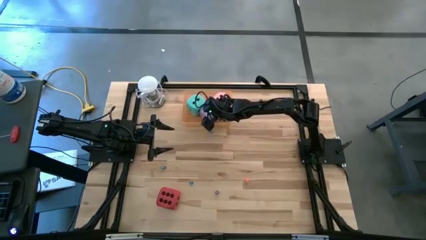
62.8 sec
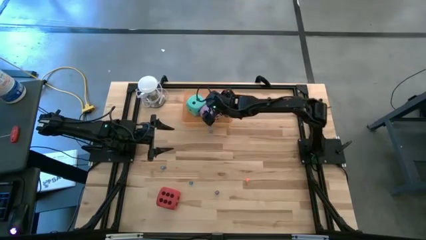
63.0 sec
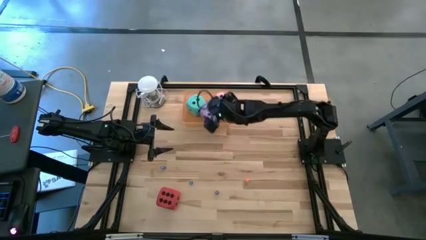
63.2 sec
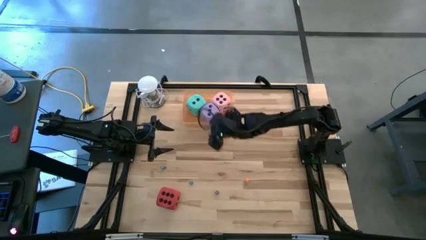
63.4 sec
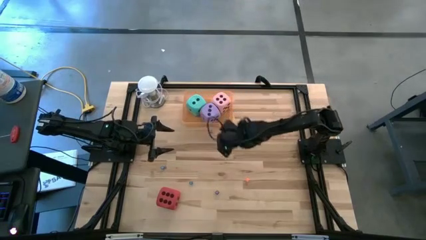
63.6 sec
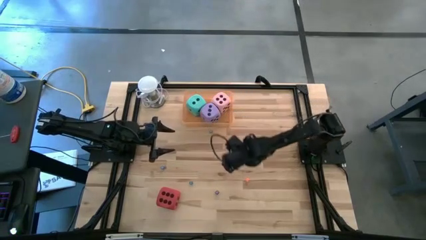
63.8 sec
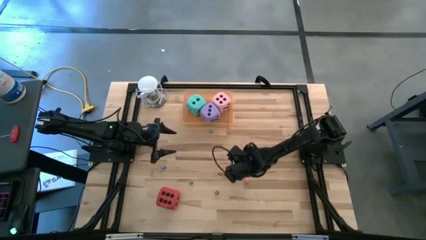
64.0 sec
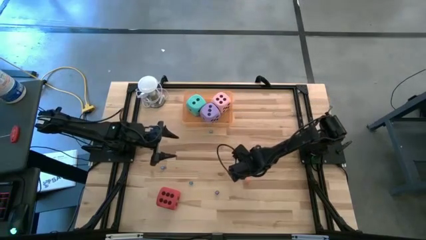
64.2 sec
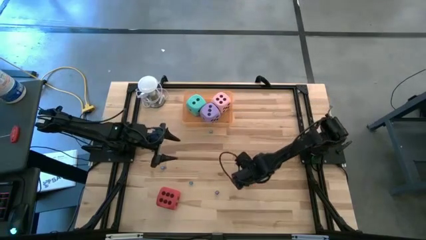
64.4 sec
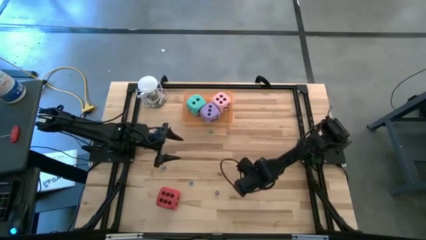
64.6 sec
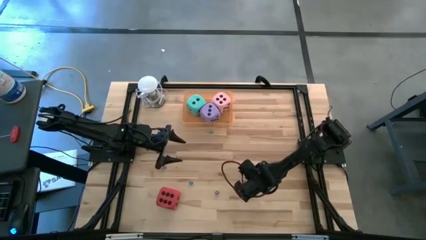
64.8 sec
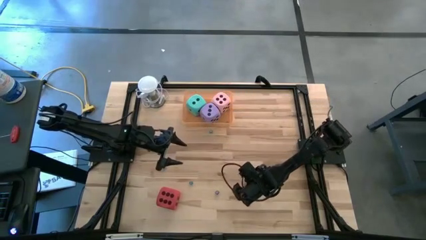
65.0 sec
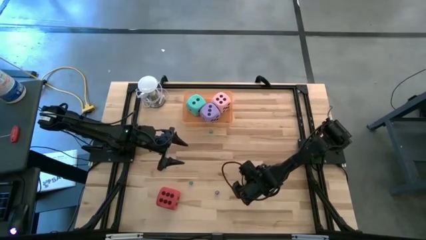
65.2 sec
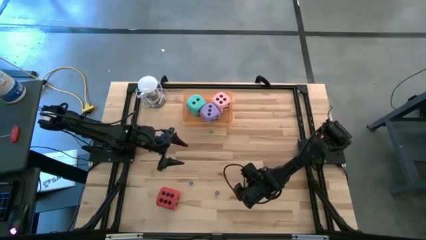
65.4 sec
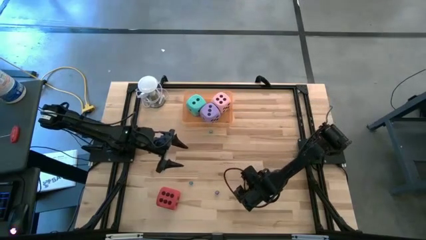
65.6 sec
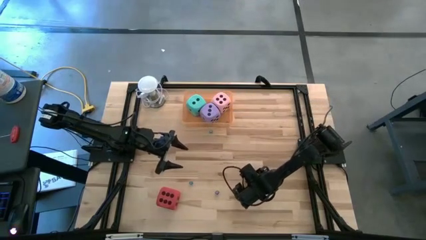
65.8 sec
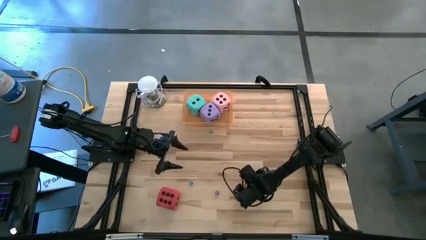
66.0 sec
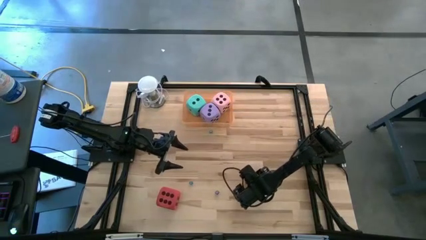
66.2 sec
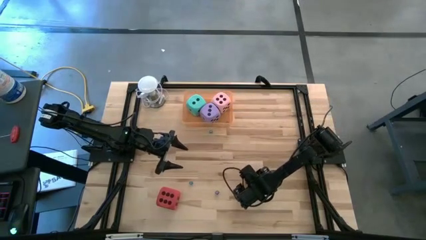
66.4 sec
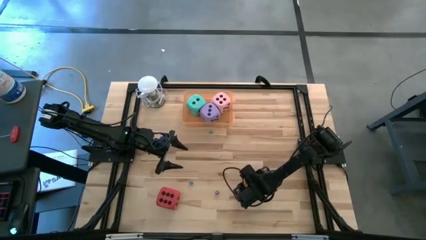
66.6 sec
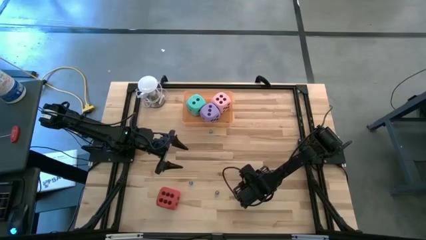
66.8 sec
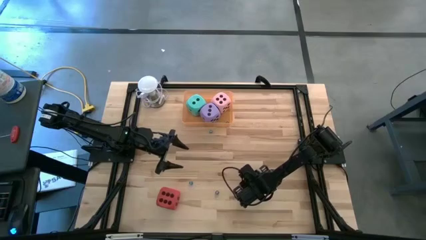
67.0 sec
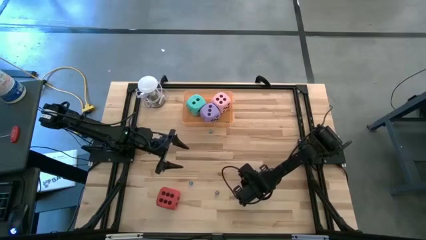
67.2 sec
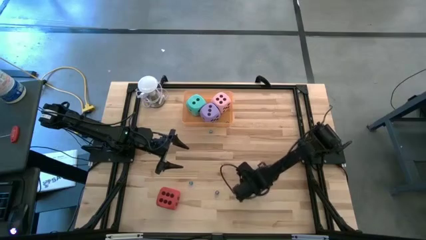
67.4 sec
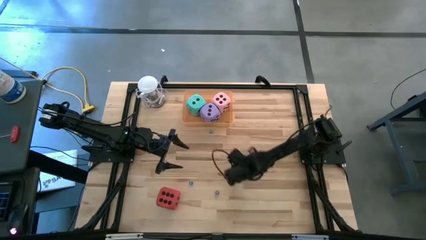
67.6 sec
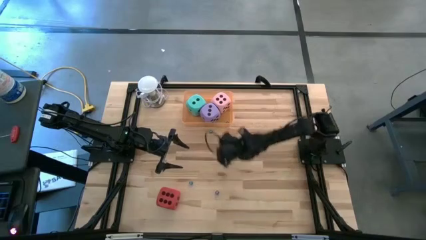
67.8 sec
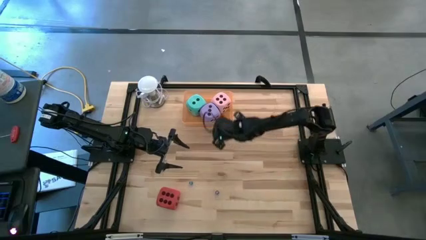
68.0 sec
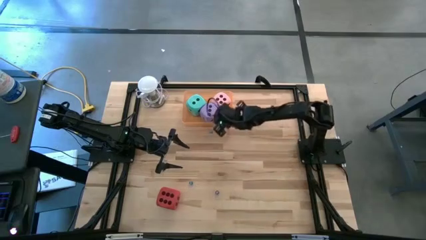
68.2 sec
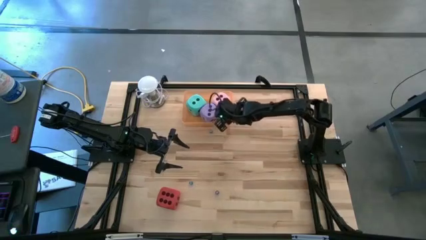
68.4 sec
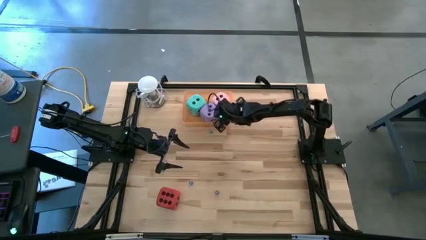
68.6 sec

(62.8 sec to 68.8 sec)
Task: Pick & Place Dice
Put the small orange die into the bin

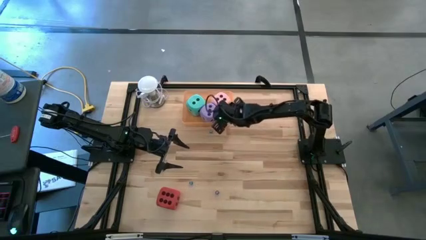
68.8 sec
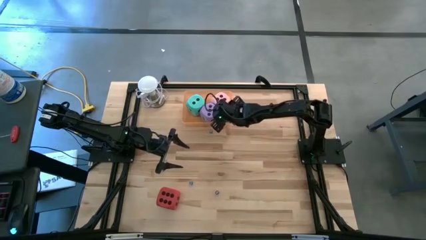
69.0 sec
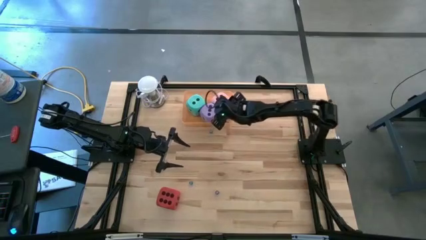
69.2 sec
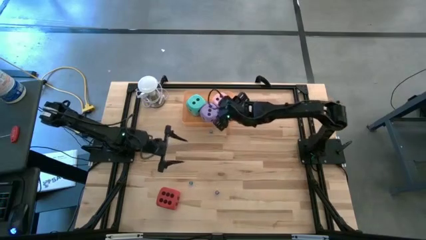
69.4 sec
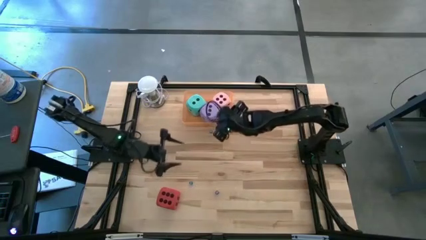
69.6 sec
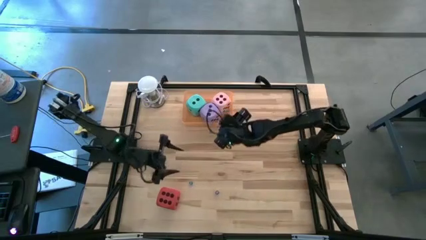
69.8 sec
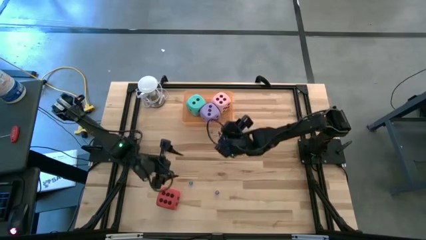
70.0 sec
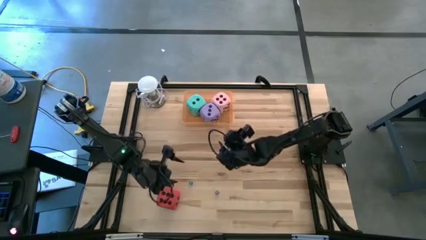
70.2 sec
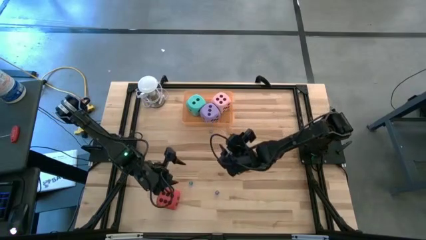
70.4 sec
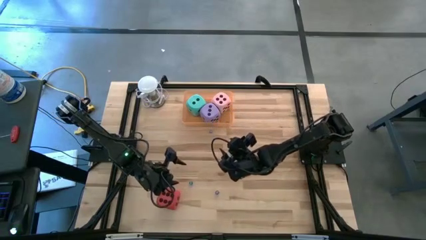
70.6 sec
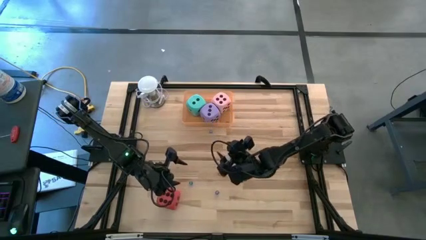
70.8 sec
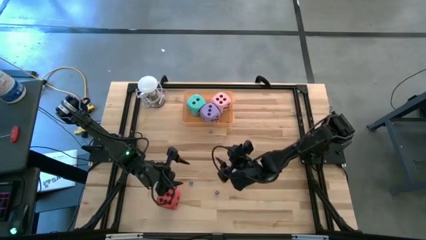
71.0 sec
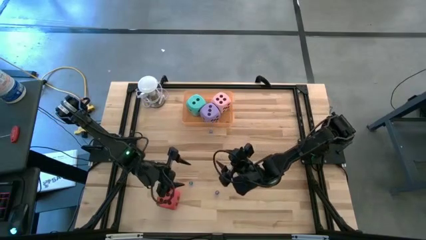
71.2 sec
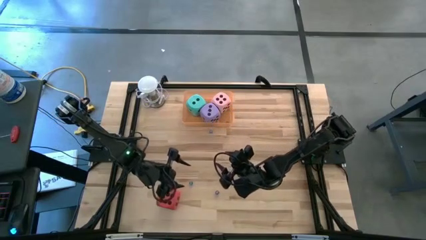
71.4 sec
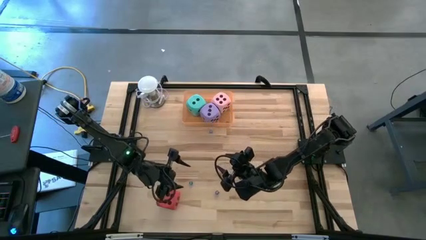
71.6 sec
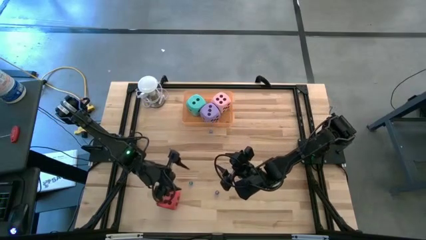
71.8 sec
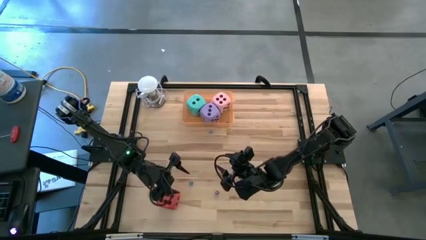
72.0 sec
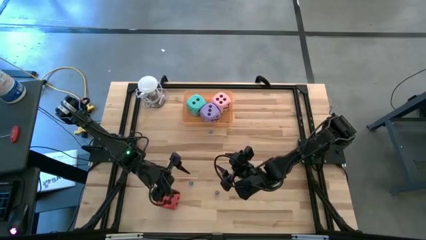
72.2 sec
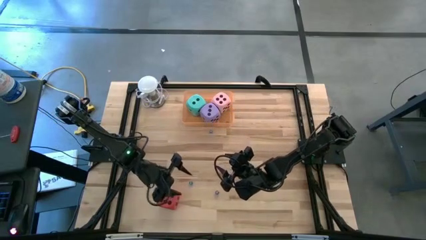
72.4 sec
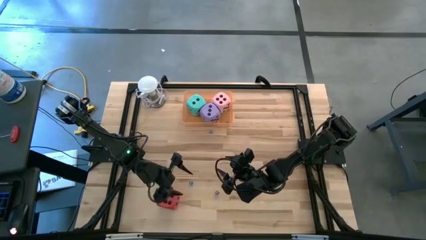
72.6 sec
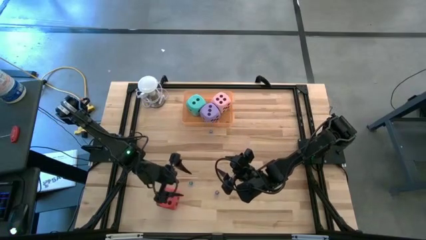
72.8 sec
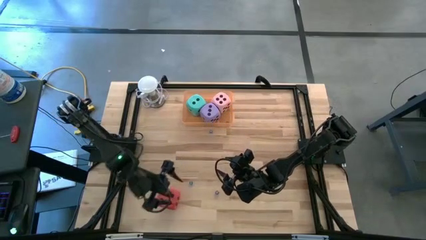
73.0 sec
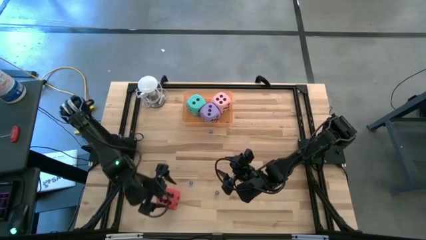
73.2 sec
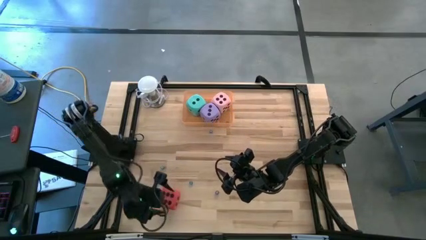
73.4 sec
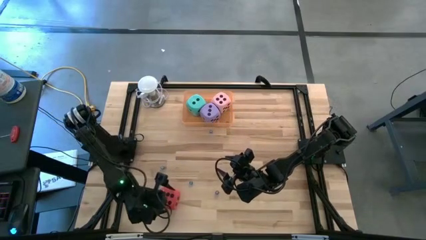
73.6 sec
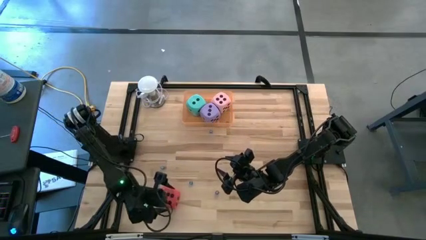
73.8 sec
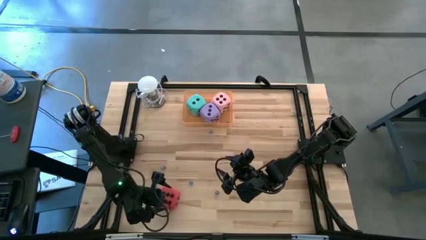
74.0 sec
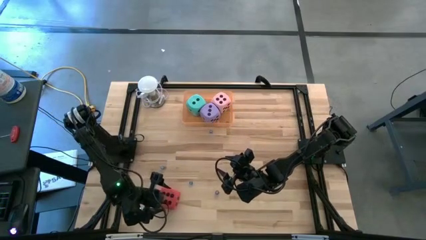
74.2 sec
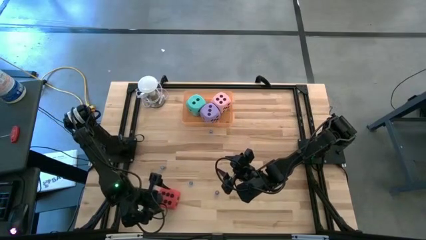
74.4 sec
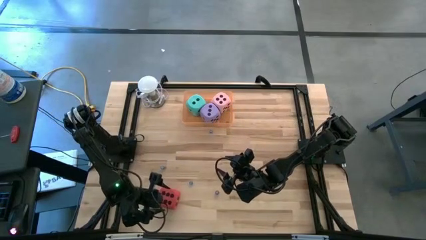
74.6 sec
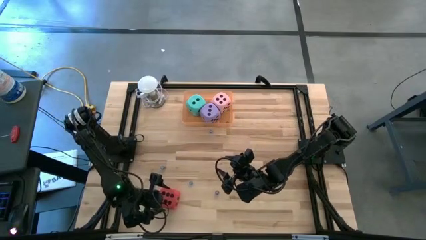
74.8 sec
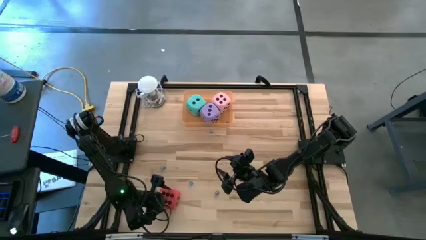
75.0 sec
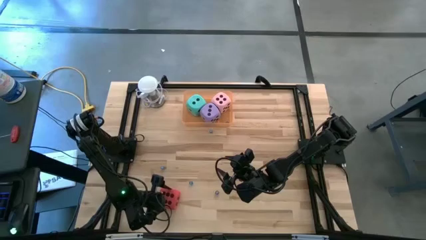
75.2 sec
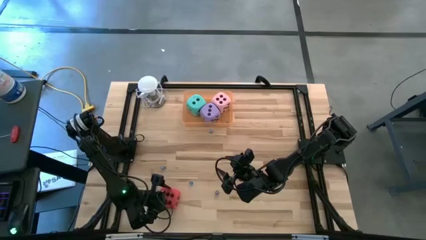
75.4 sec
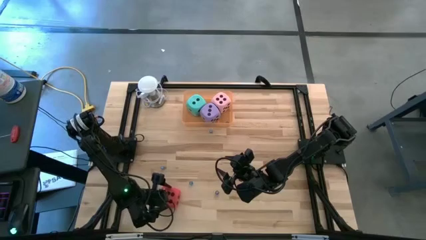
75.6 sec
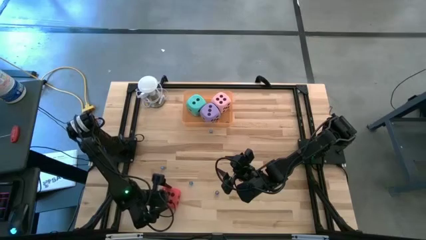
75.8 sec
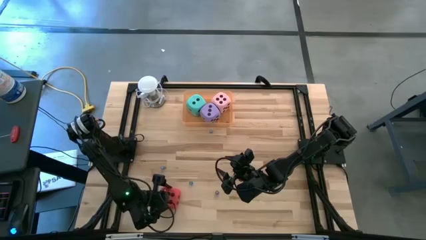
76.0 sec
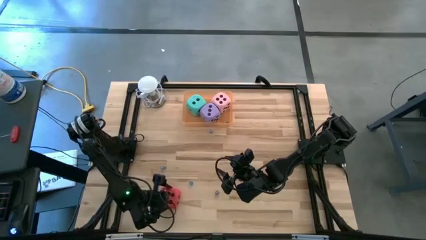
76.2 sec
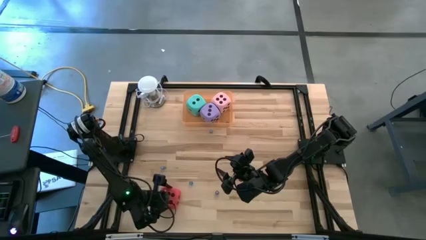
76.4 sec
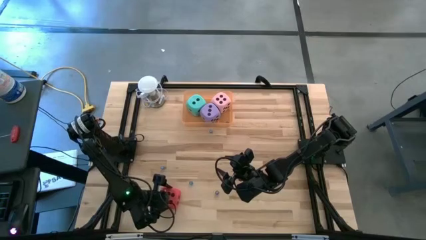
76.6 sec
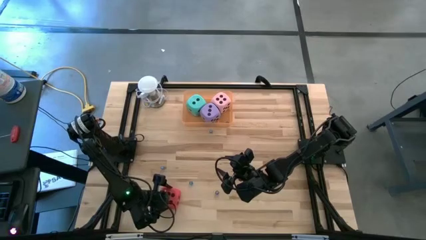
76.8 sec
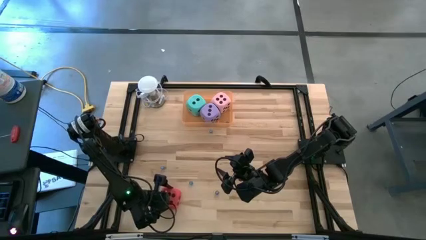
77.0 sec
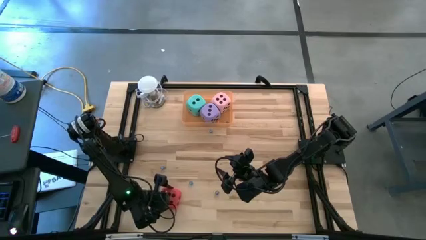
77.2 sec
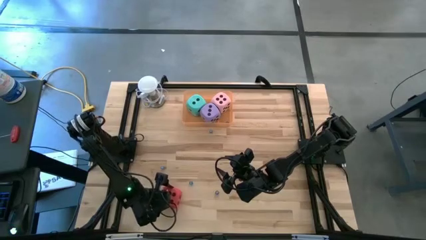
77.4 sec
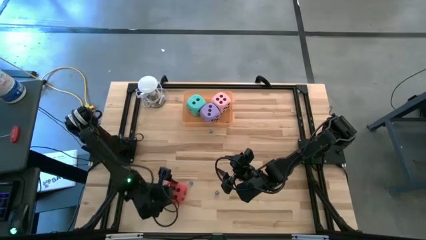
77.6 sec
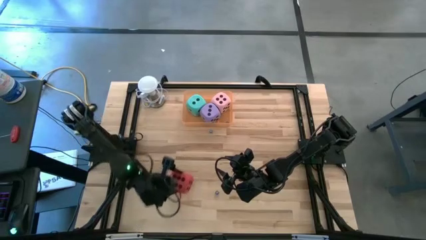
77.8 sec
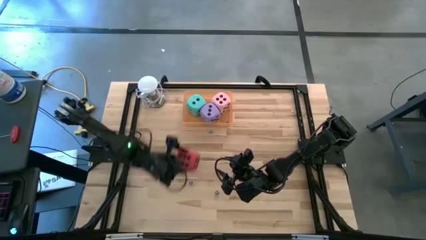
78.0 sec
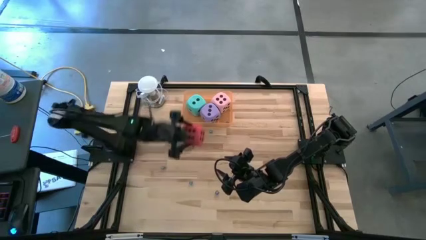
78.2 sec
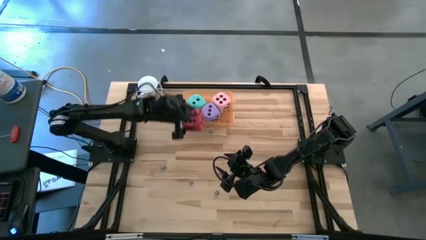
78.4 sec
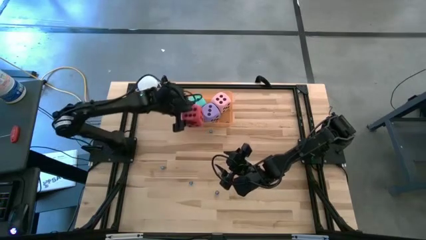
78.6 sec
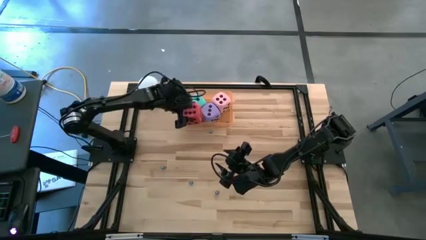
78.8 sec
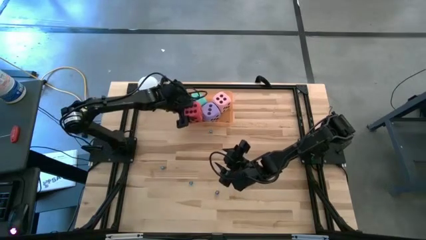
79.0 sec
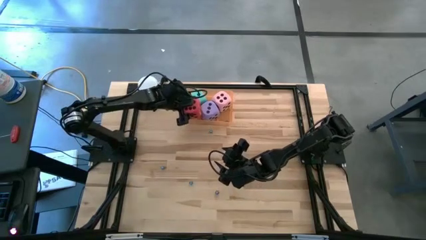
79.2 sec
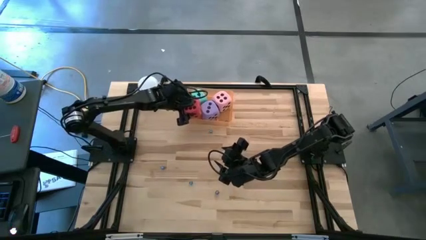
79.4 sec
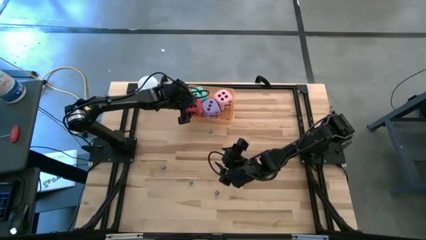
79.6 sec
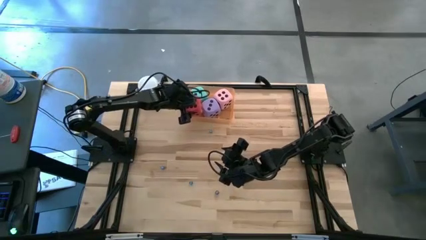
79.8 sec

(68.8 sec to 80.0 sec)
Put the large red die into the bin
